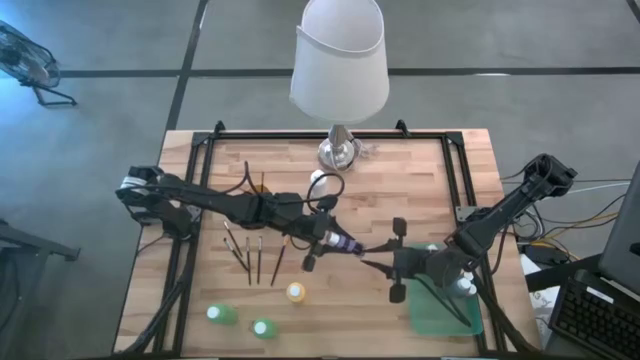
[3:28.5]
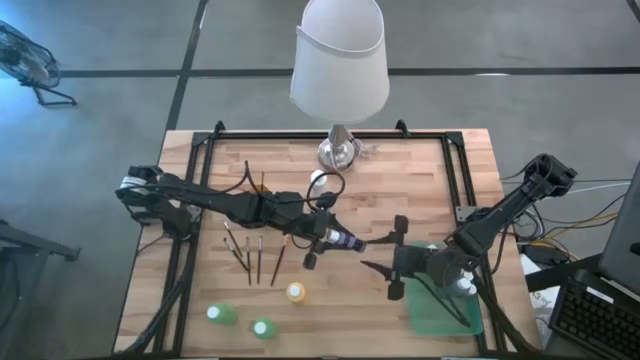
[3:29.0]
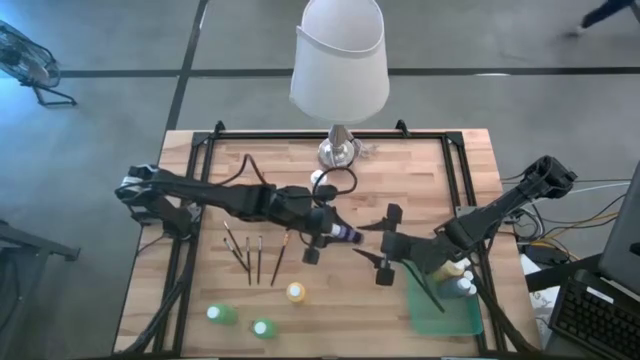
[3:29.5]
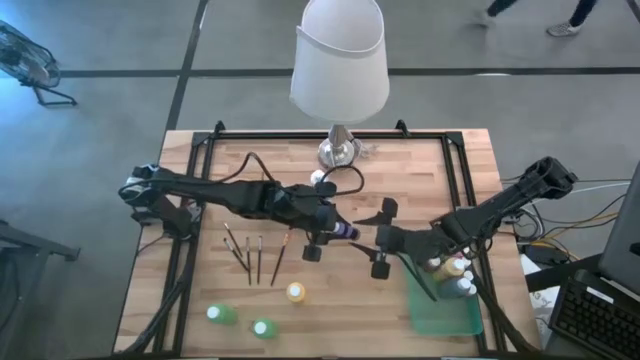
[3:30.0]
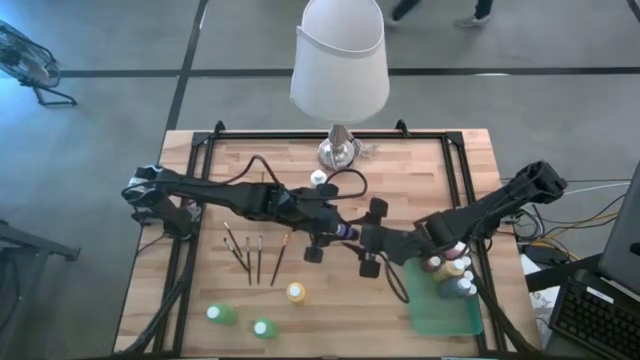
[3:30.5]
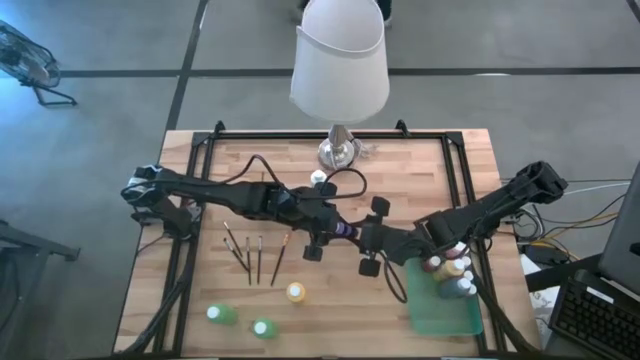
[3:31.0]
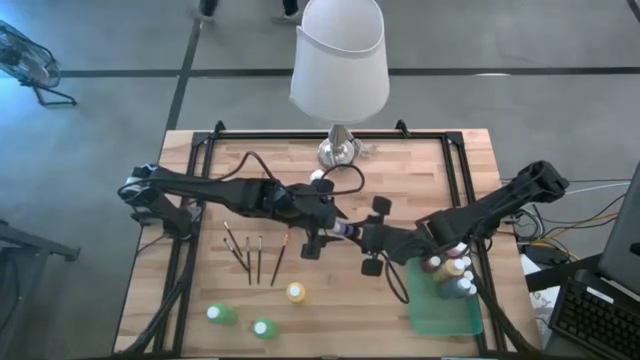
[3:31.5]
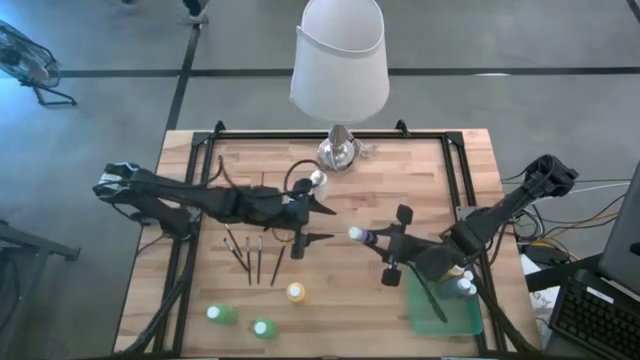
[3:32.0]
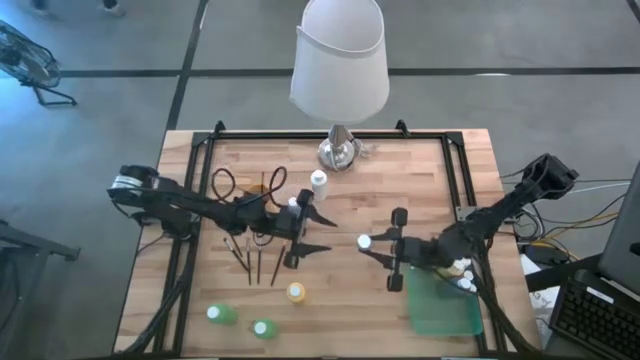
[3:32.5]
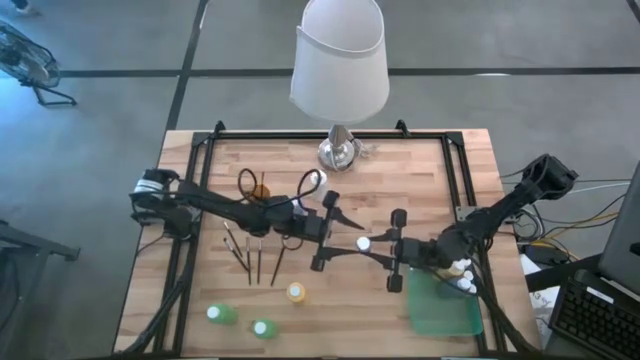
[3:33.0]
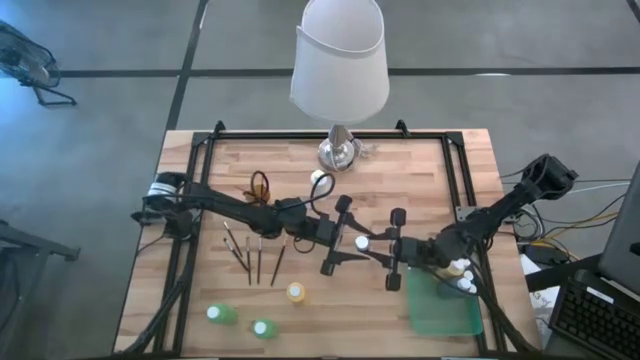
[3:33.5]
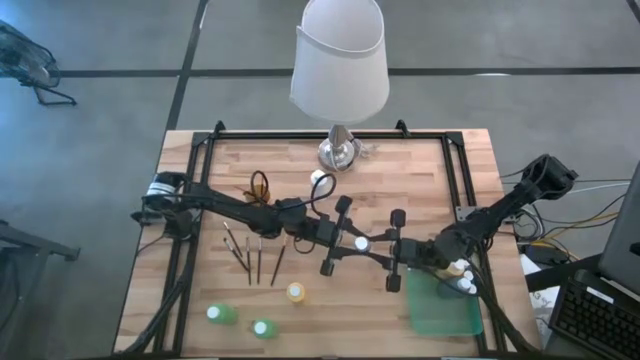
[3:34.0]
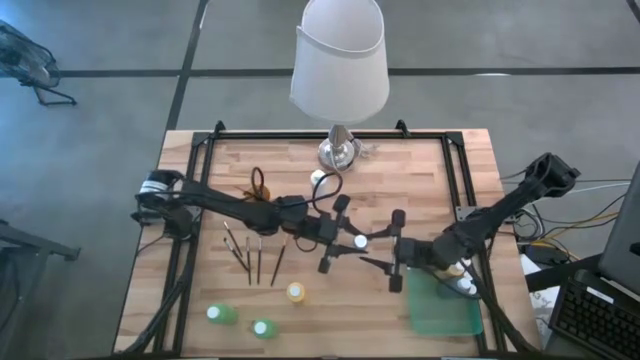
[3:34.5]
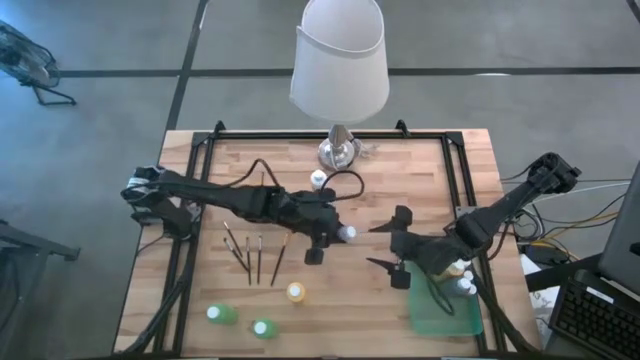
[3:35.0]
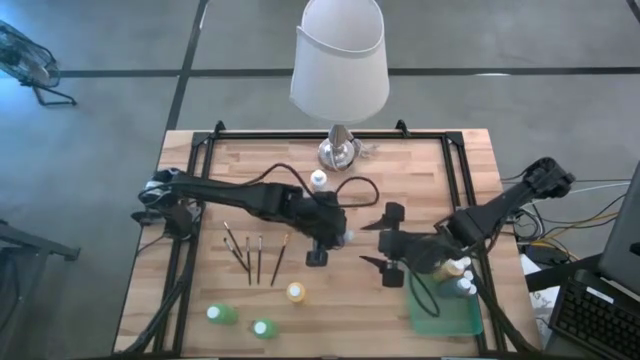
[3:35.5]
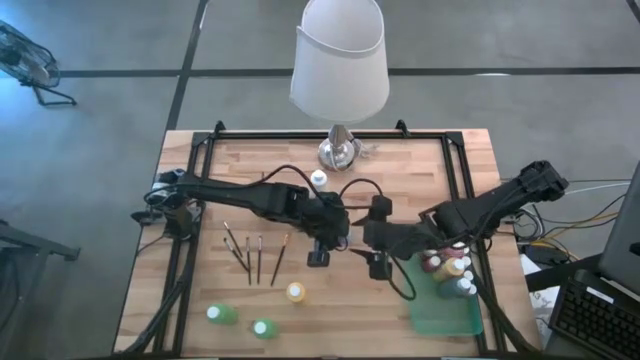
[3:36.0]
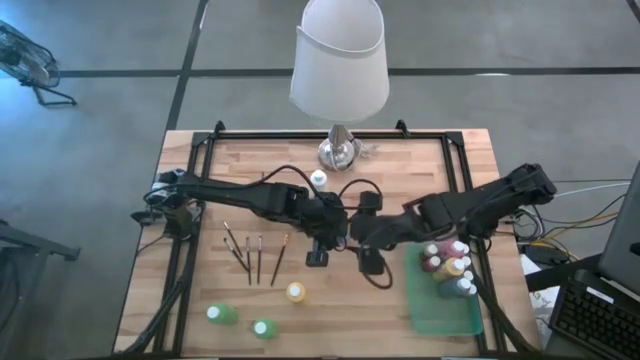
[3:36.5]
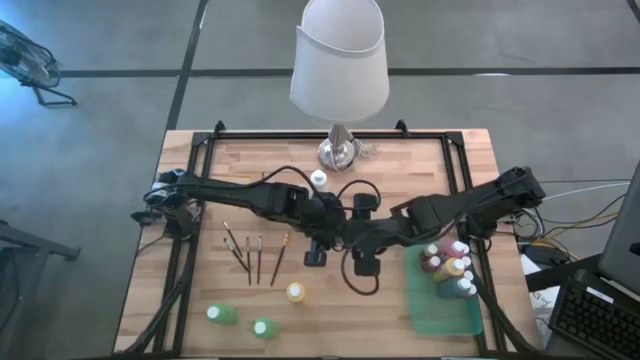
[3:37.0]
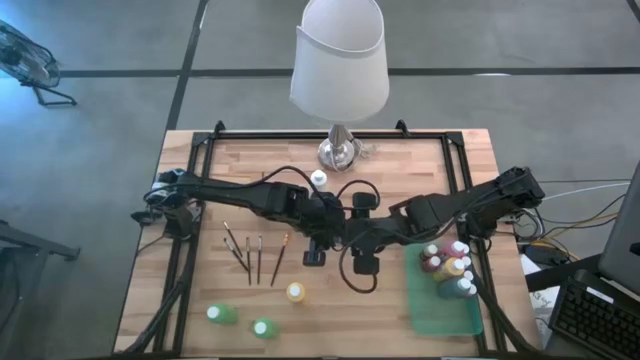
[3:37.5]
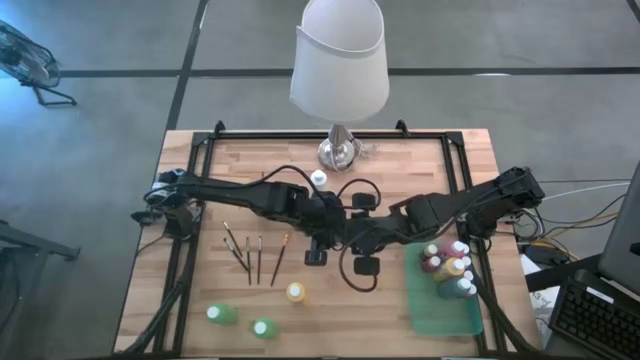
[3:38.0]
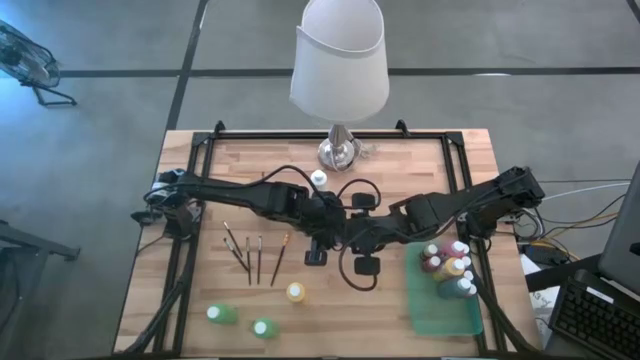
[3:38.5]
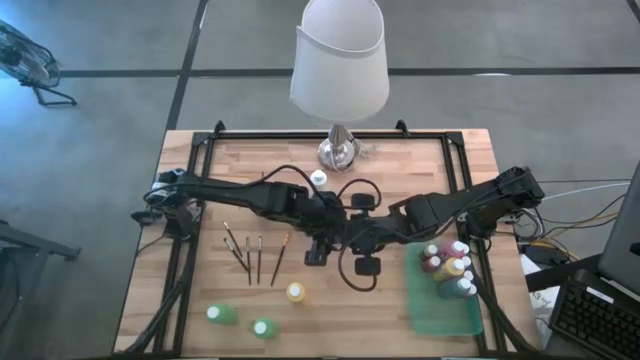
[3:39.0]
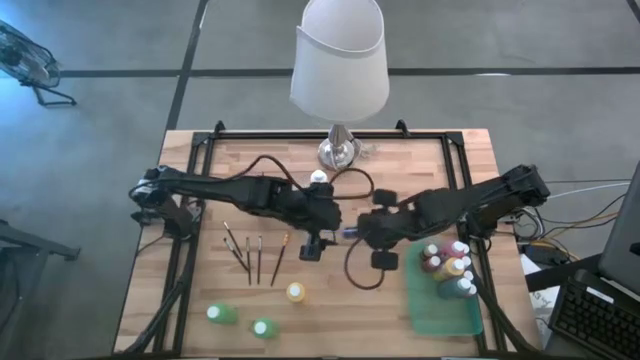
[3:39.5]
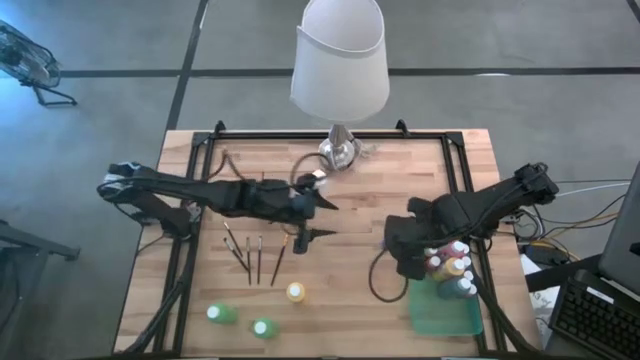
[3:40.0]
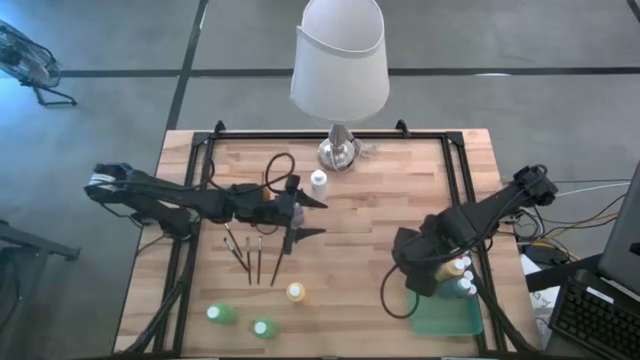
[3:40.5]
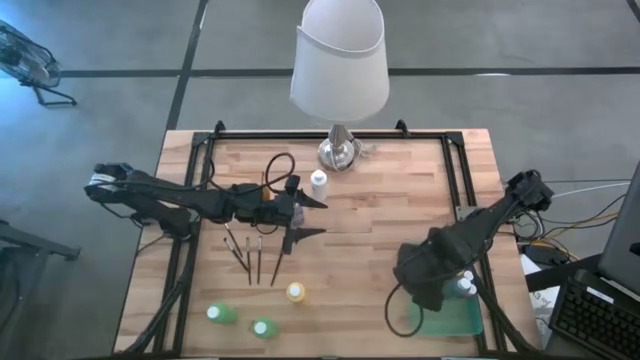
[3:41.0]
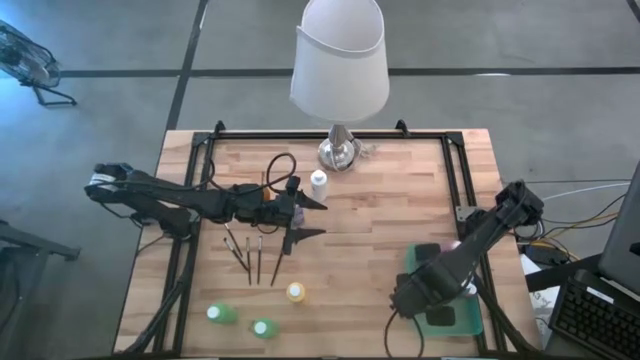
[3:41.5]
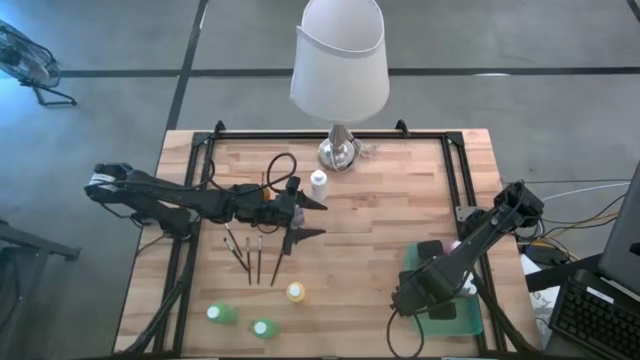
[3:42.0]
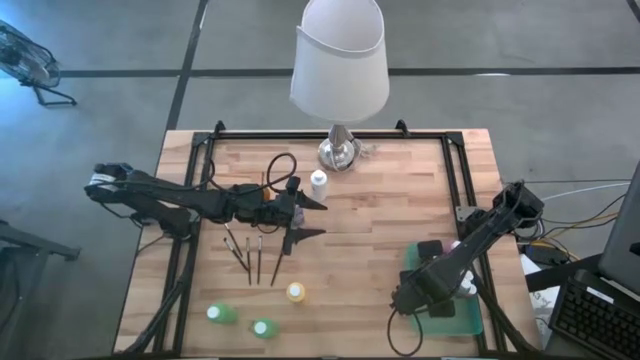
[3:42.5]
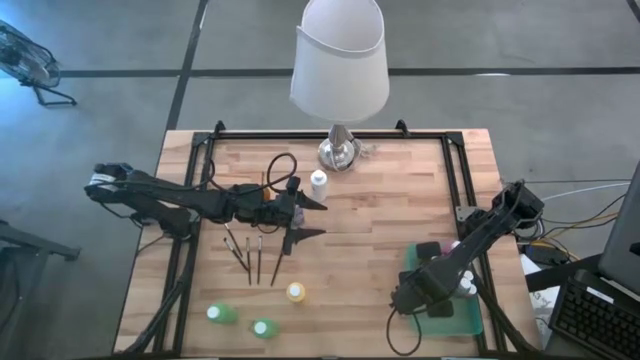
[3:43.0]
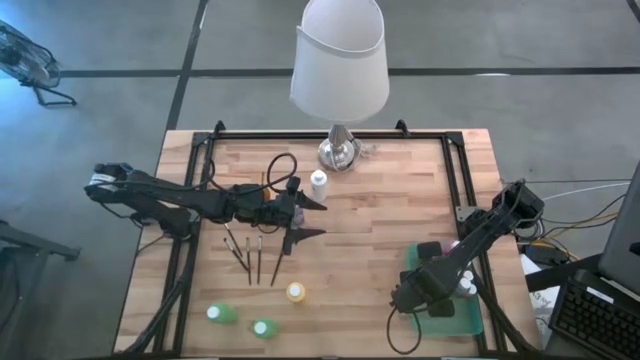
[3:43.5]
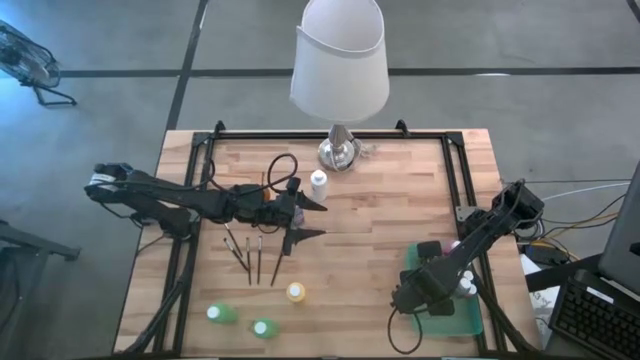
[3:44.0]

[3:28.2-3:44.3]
Task: Pick & Place Paint Supplies
Put the purple paint bottle into the green bin
